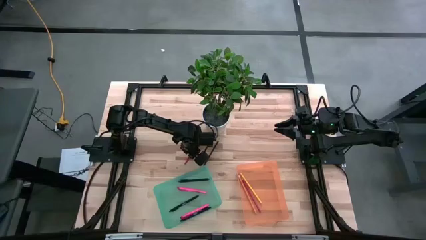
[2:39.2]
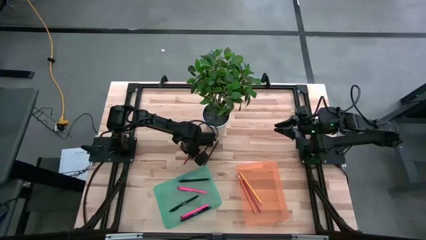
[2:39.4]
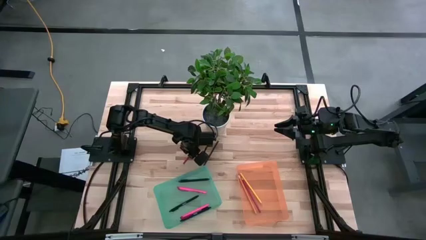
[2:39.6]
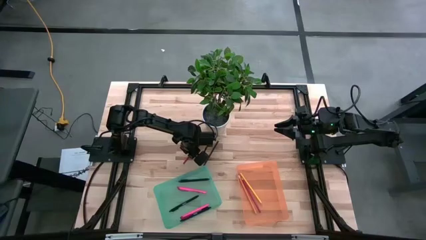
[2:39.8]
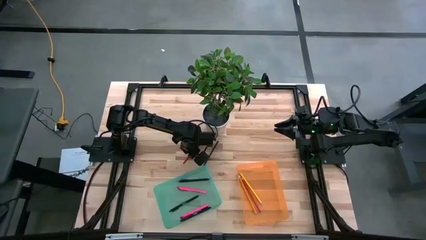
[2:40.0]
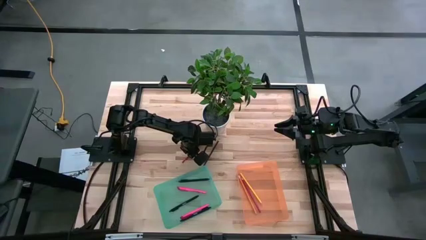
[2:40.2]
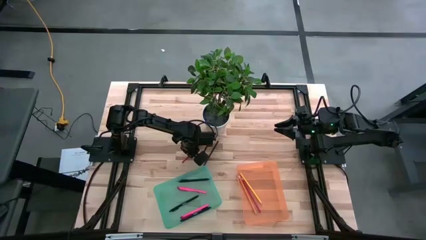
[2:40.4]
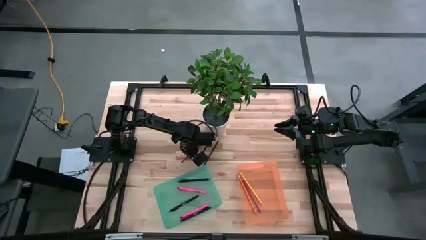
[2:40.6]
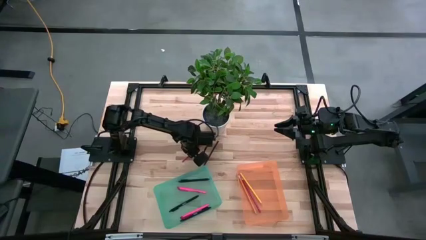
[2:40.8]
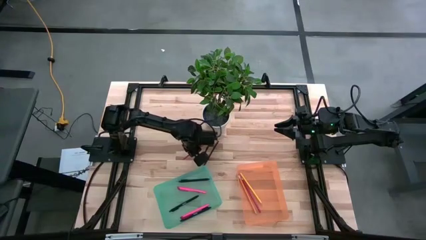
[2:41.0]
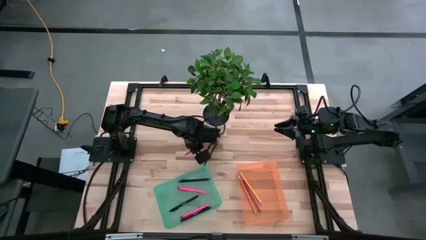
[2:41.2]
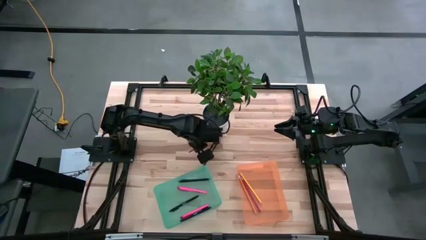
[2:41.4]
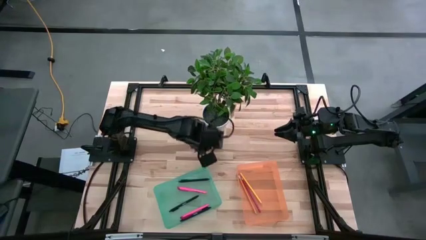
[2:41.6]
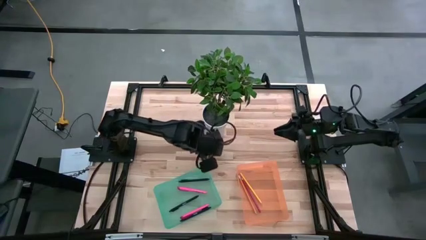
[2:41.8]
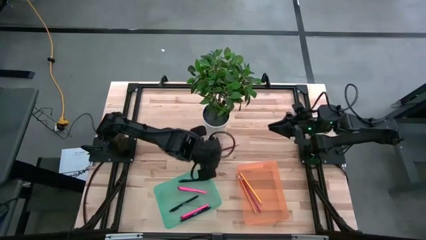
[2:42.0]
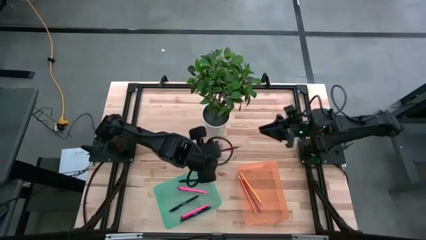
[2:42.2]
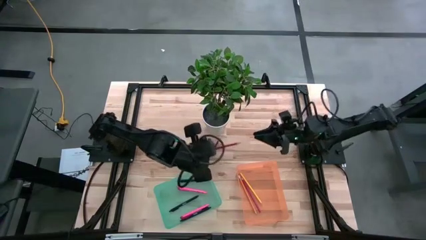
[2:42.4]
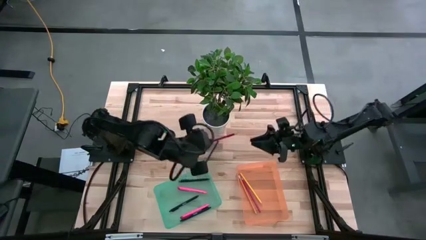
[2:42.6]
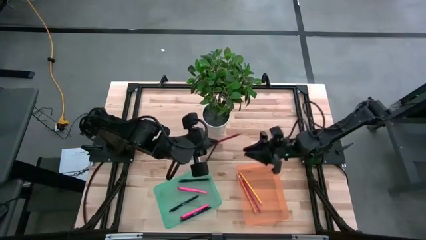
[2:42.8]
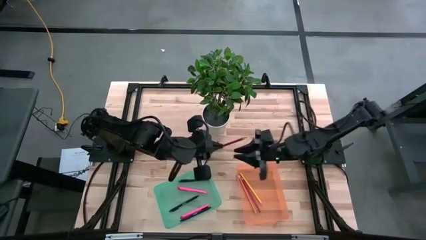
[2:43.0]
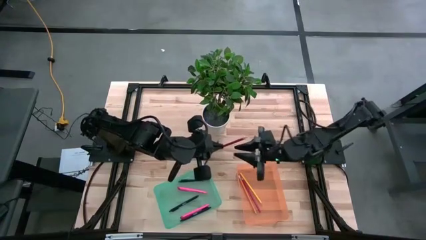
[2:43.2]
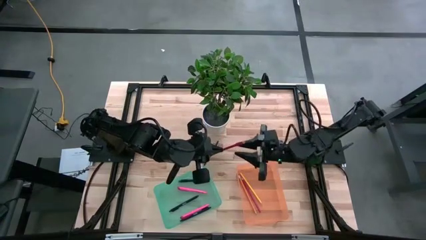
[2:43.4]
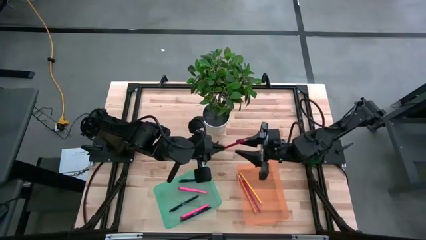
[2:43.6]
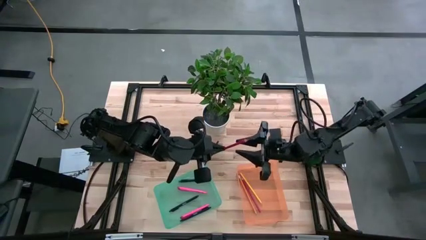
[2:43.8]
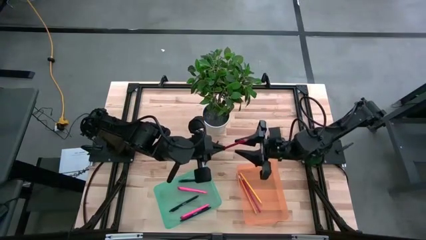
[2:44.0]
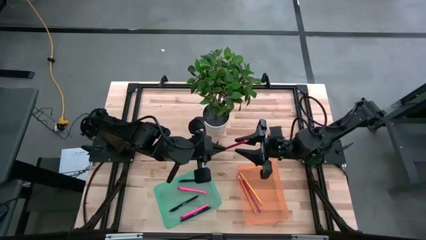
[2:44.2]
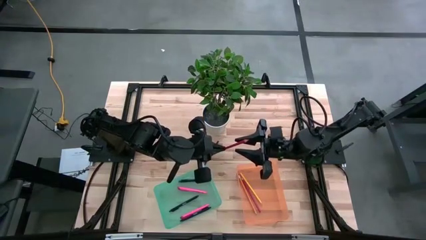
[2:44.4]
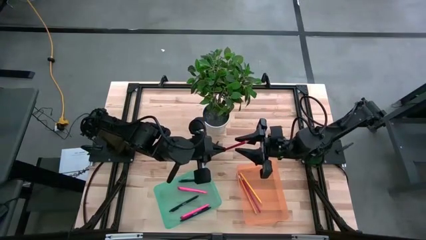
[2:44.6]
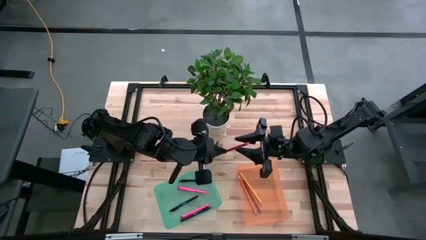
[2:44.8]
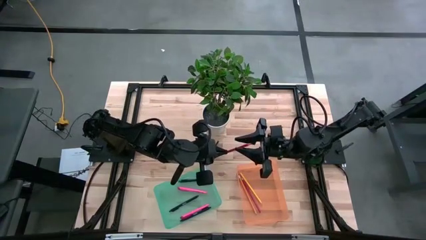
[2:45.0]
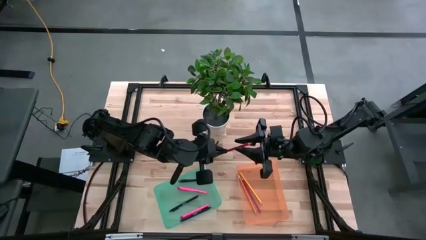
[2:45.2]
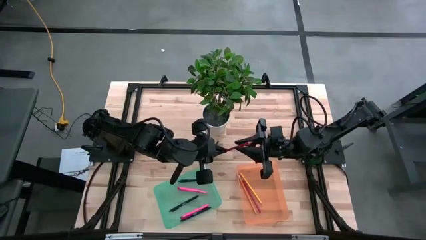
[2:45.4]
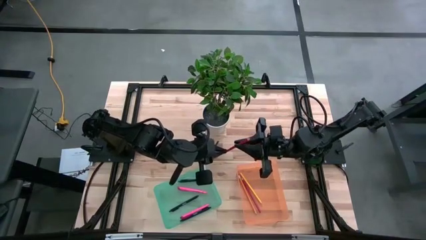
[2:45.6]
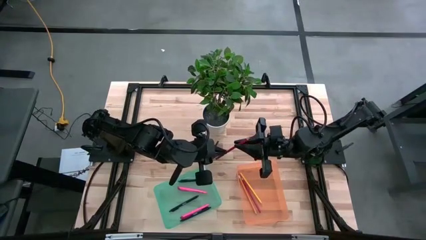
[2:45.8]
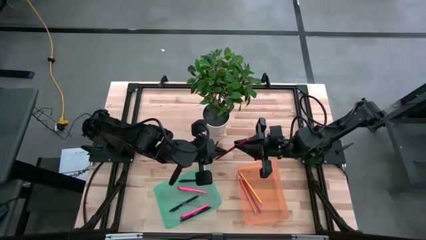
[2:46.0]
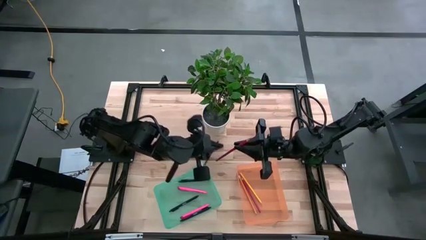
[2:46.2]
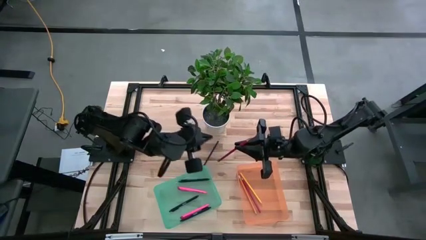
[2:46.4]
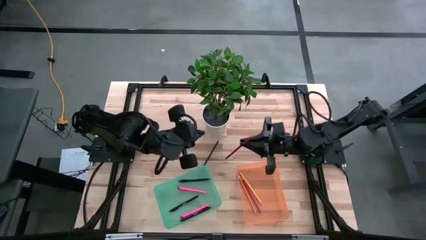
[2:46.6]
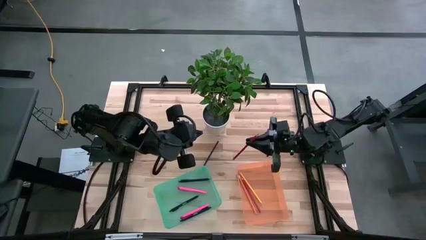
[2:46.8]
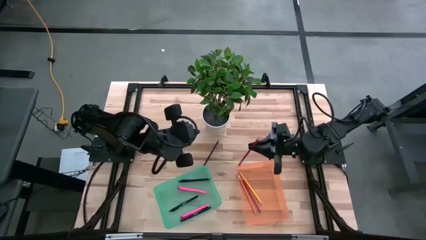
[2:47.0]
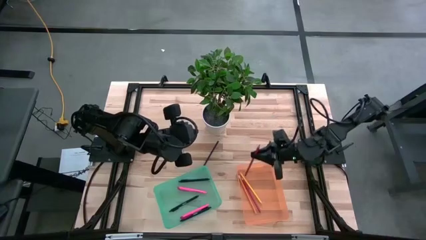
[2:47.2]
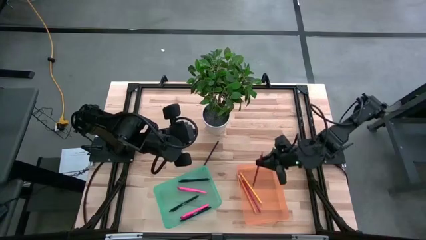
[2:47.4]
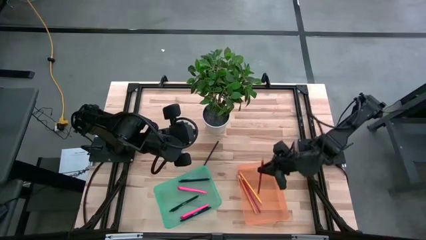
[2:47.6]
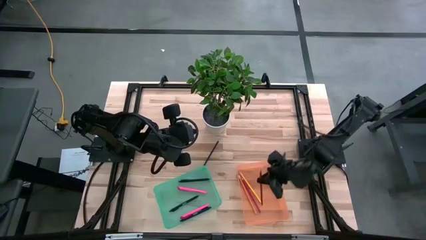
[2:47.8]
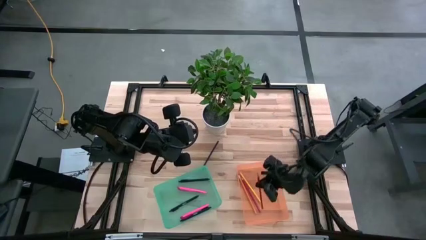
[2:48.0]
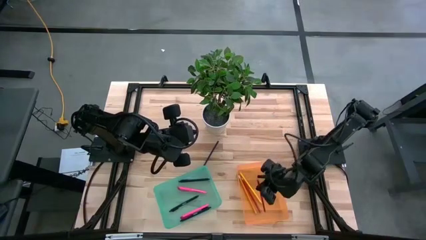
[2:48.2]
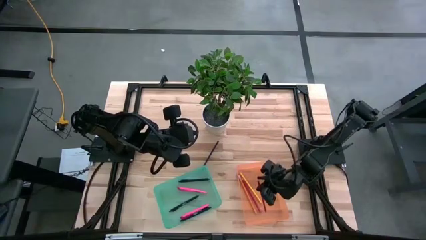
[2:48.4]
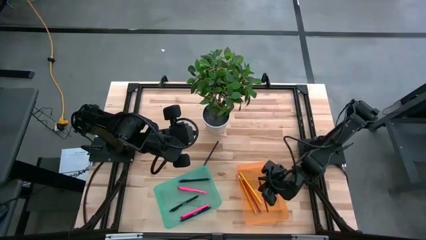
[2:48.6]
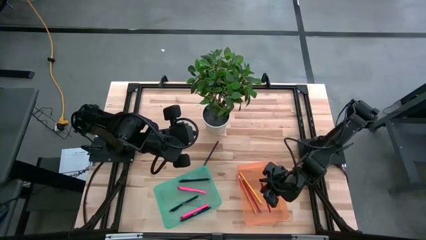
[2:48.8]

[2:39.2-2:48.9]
Task: Sort pens & pencils
Put the red pencil into the orange bin
